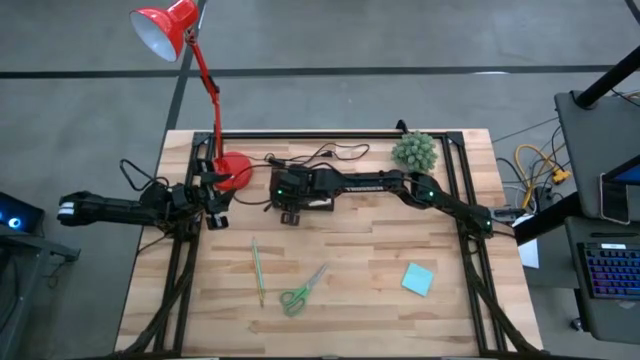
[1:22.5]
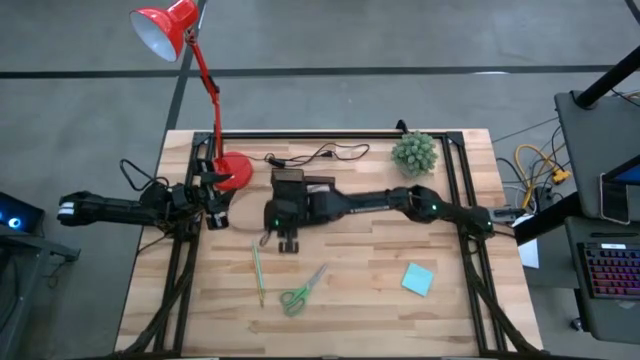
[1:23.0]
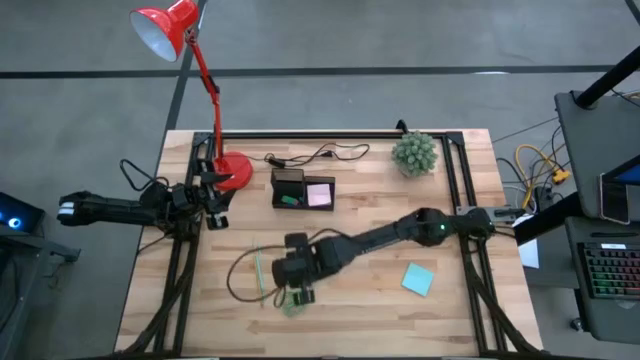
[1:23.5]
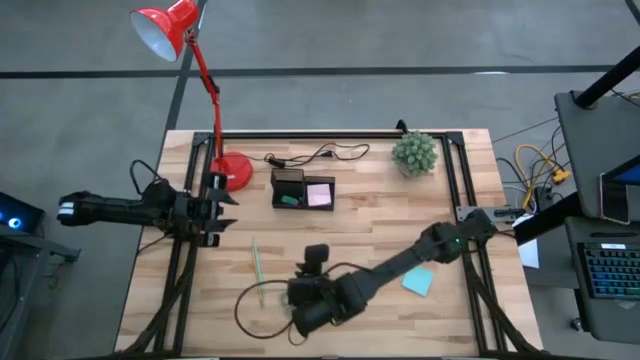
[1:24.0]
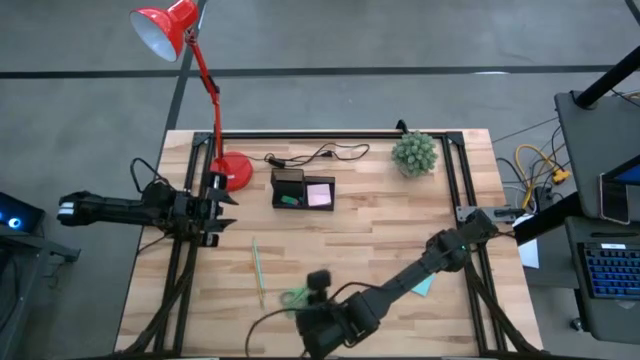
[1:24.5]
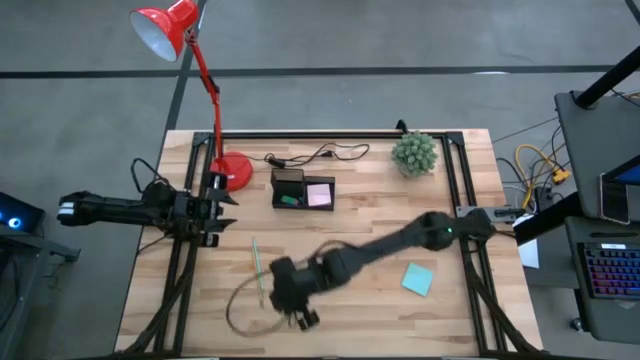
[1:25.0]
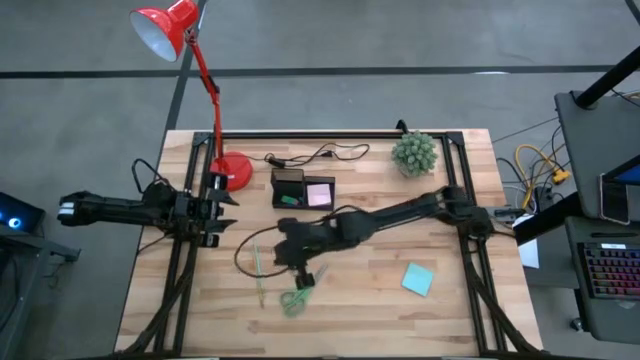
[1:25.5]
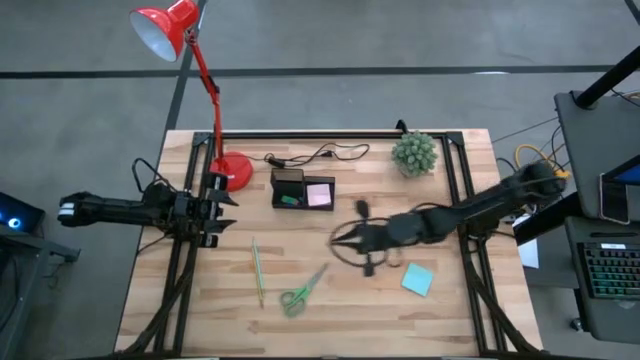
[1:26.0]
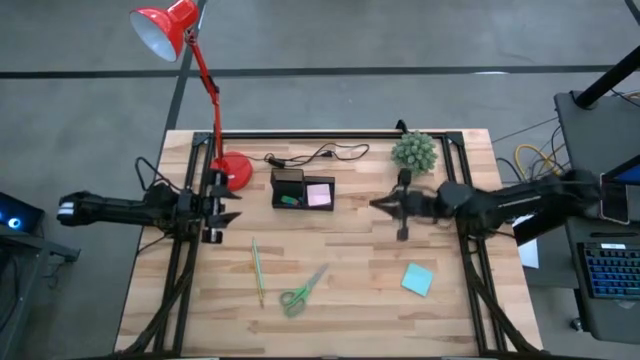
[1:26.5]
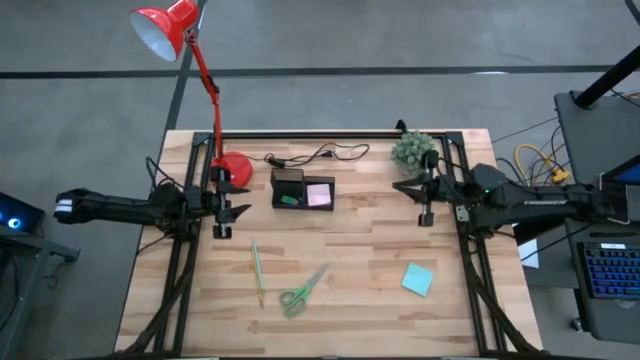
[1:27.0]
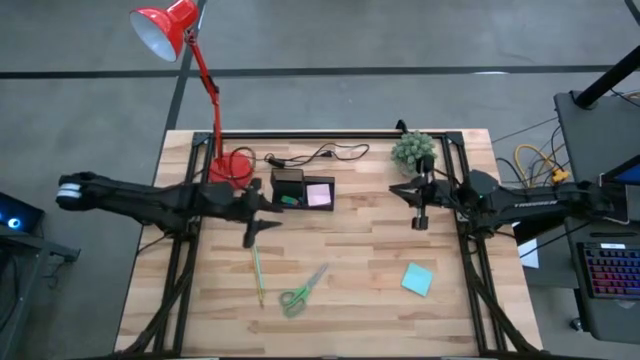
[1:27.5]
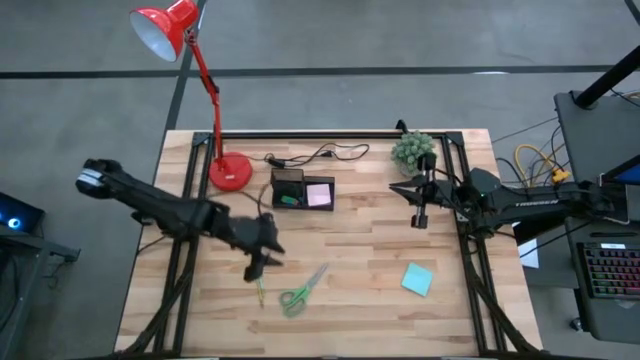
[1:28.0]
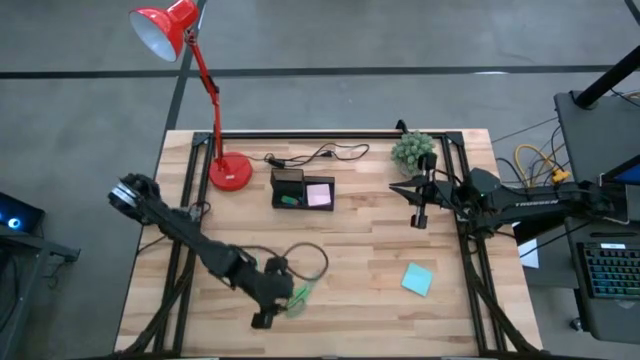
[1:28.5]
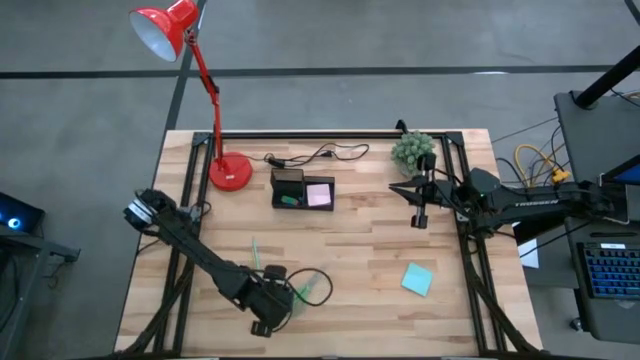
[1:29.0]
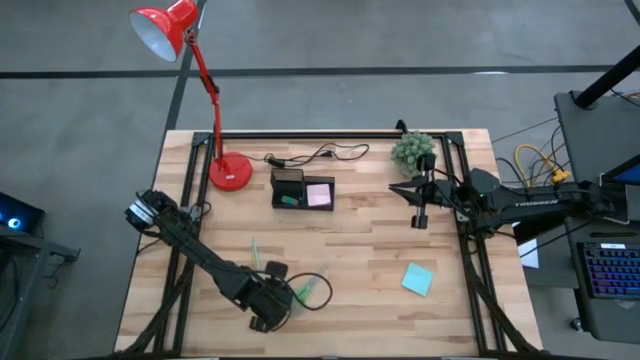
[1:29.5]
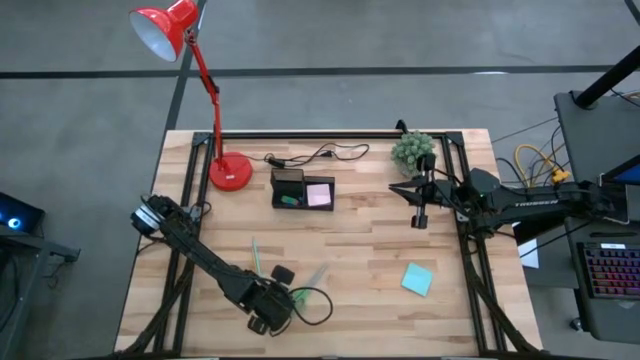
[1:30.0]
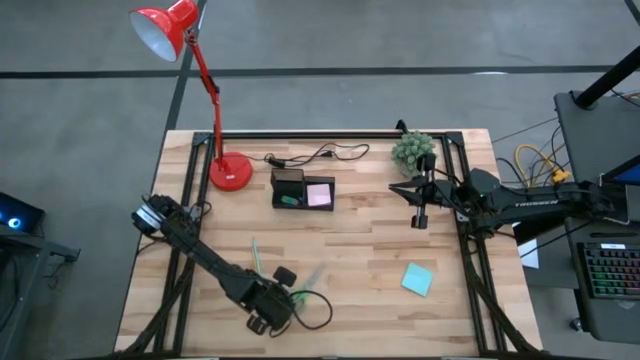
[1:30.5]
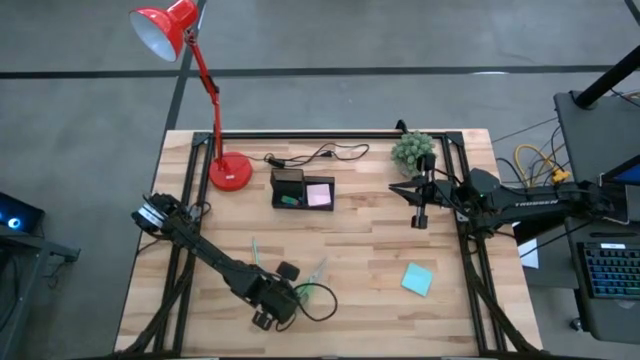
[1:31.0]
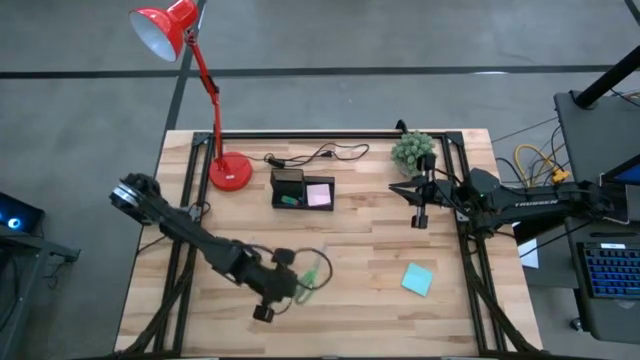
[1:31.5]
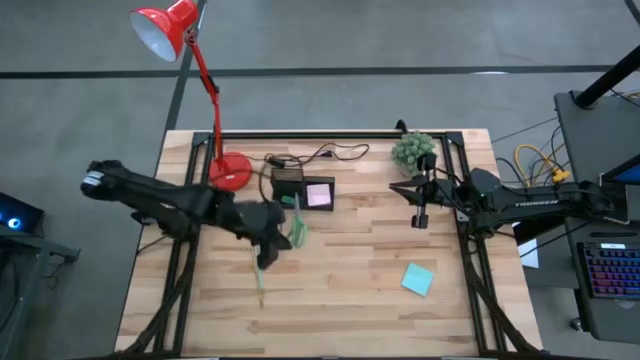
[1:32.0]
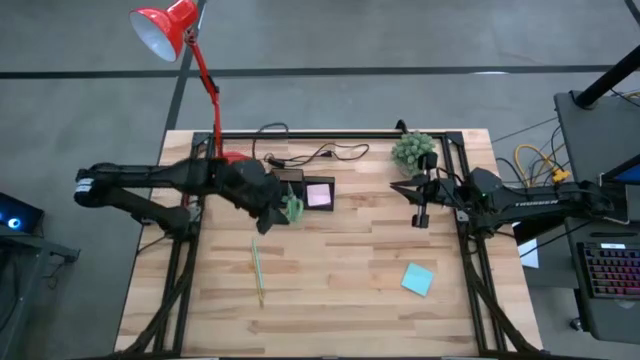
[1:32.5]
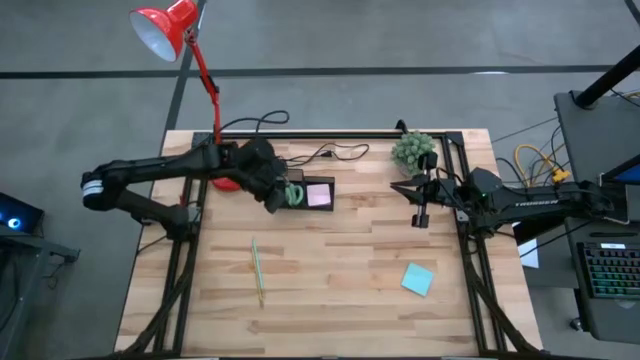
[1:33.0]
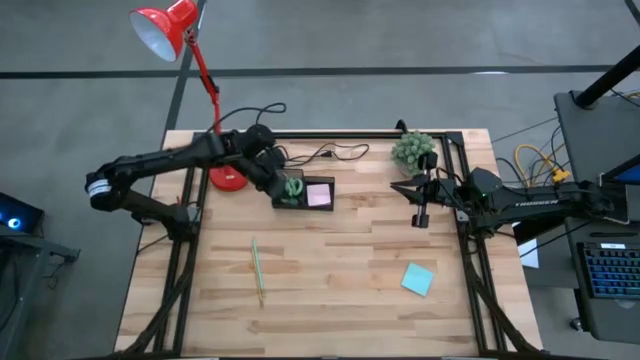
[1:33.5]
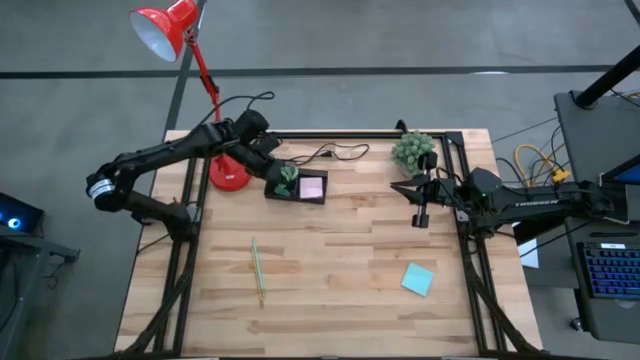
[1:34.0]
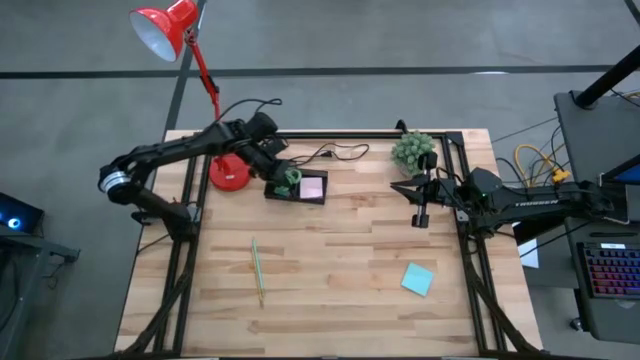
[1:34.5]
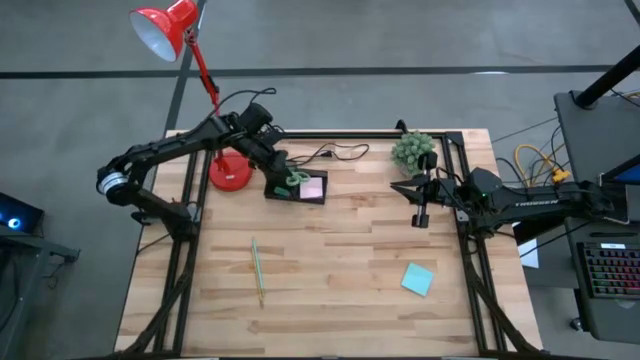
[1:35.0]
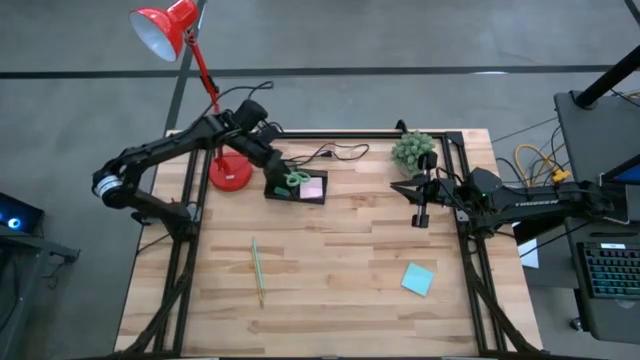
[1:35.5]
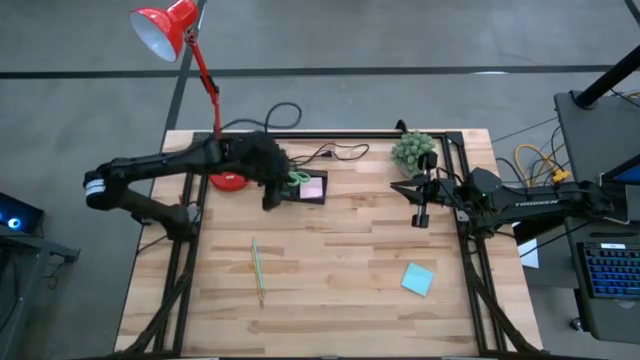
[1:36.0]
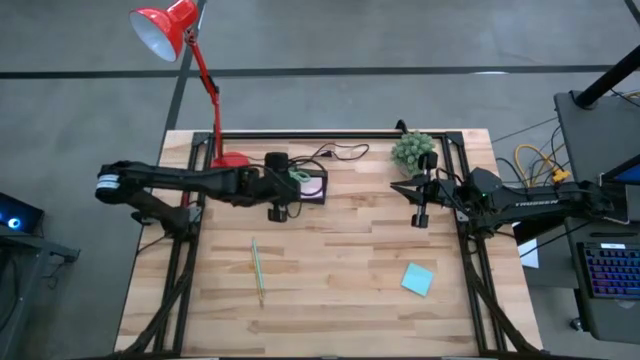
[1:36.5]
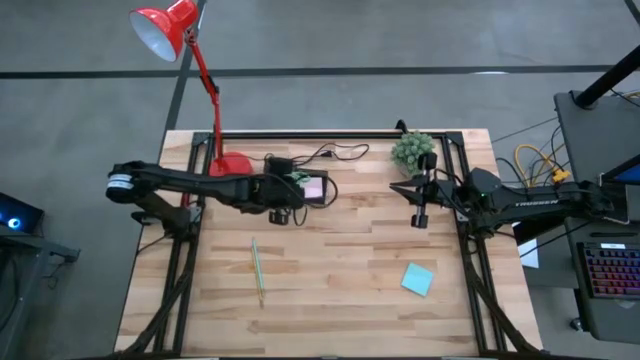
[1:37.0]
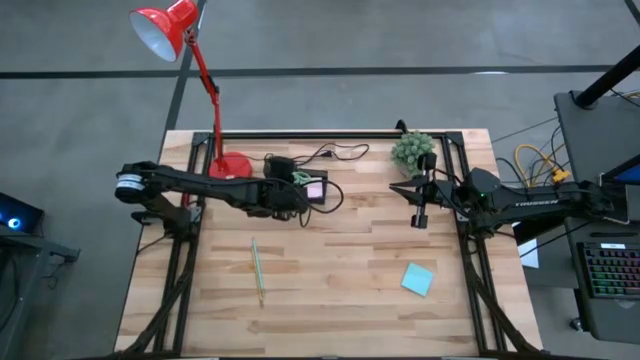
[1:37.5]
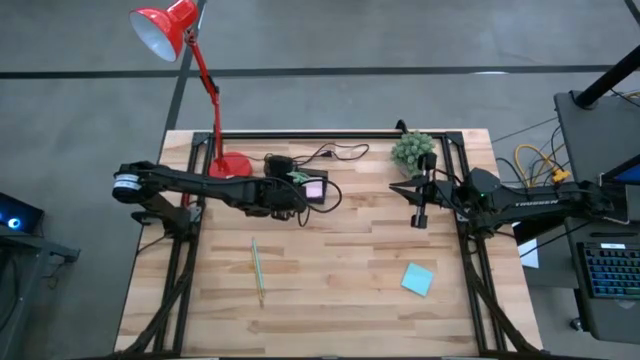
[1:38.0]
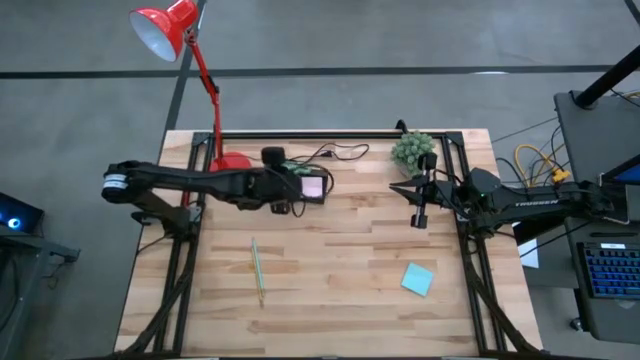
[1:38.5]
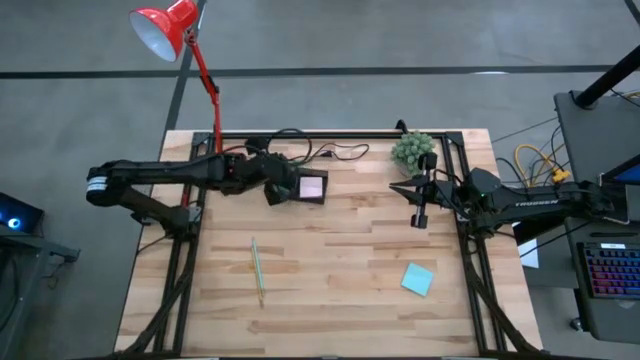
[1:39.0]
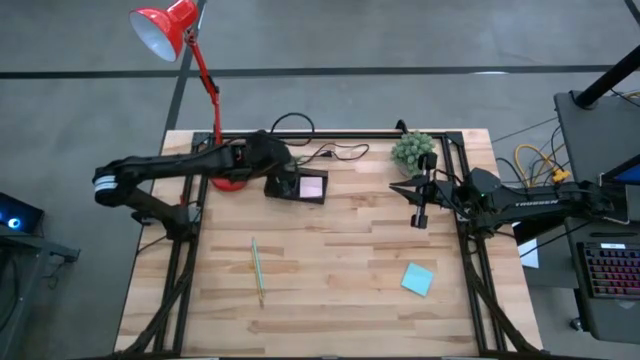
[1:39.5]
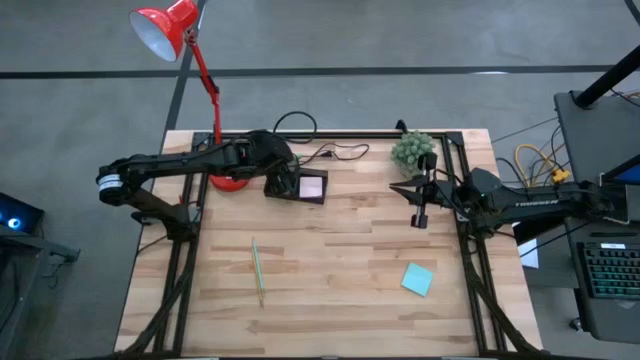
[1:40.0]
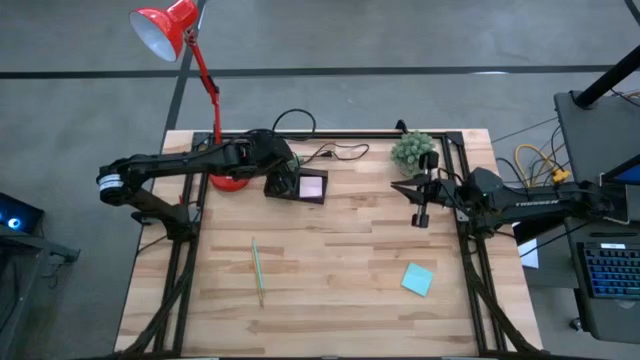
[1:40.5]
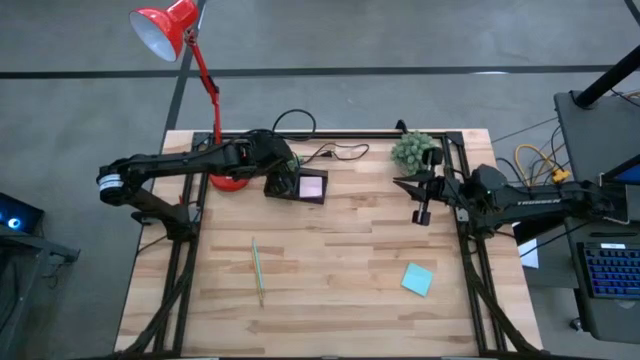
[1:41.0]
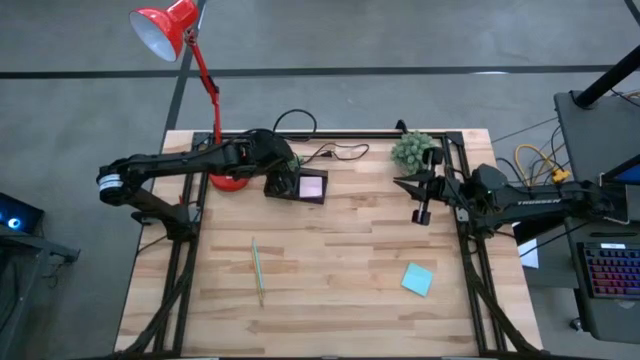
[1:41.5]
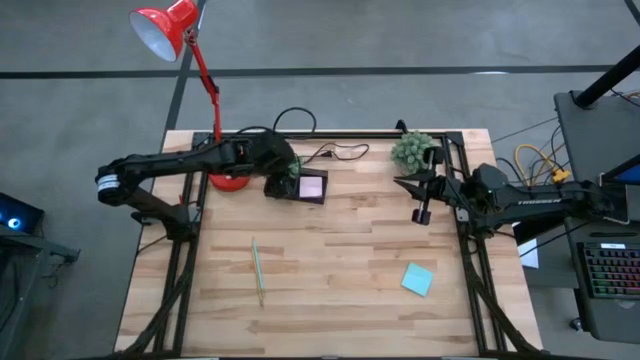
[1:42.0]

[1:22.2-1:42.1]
Task: Pick and place office supplies into organizer
Put the green scissors into the black mesh desk organizer

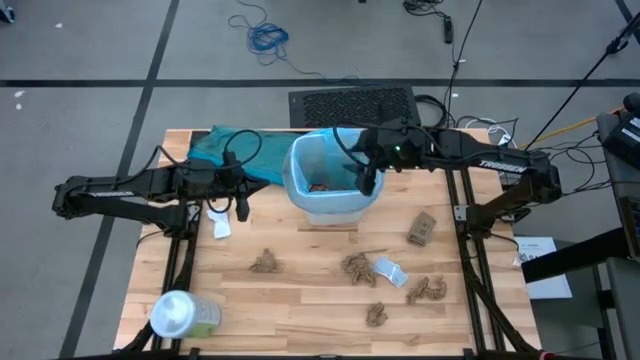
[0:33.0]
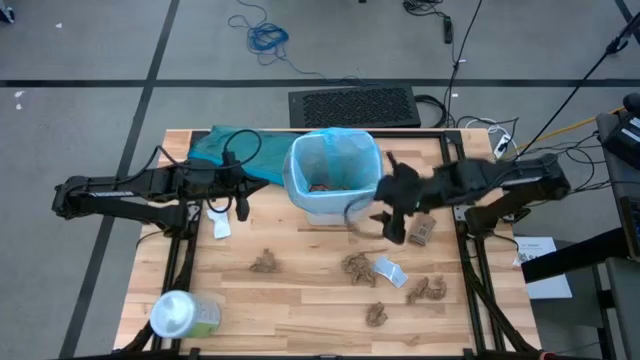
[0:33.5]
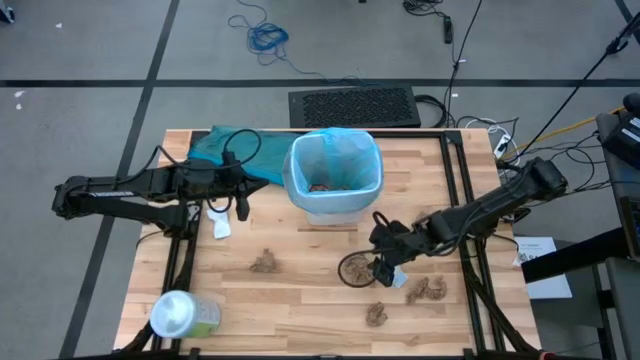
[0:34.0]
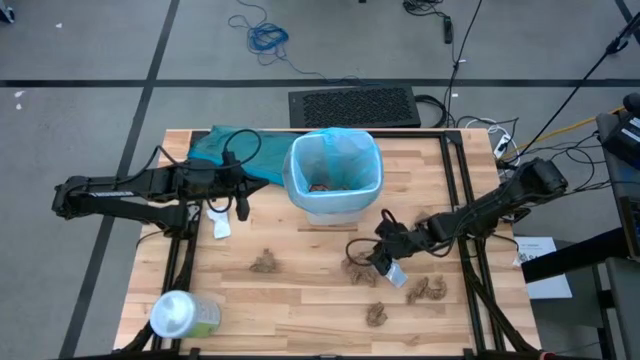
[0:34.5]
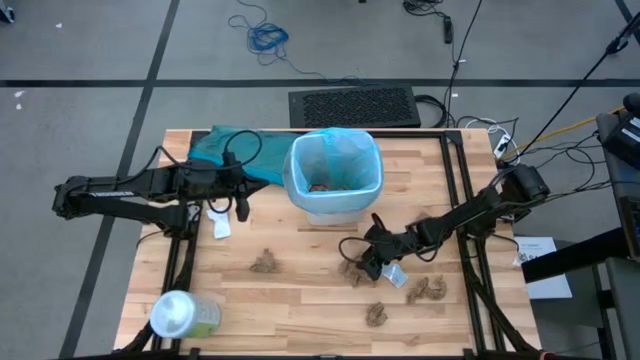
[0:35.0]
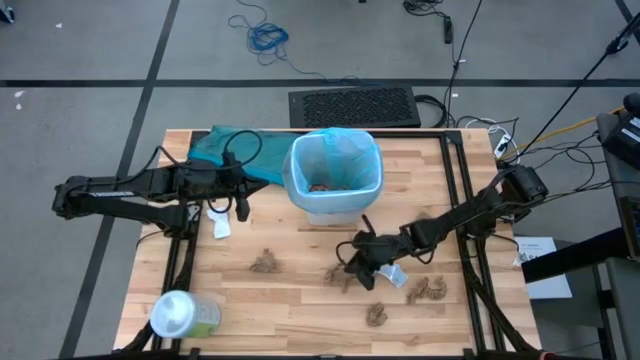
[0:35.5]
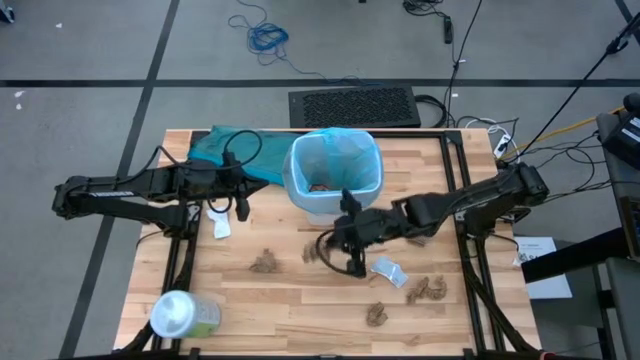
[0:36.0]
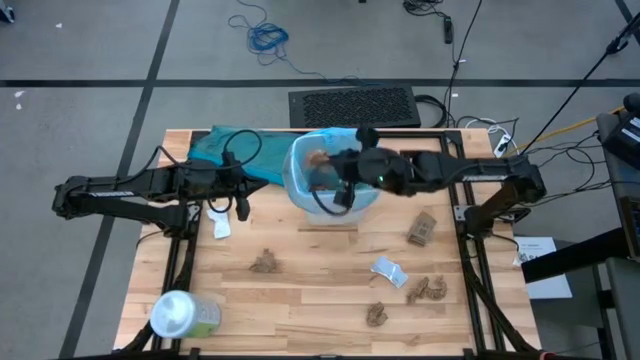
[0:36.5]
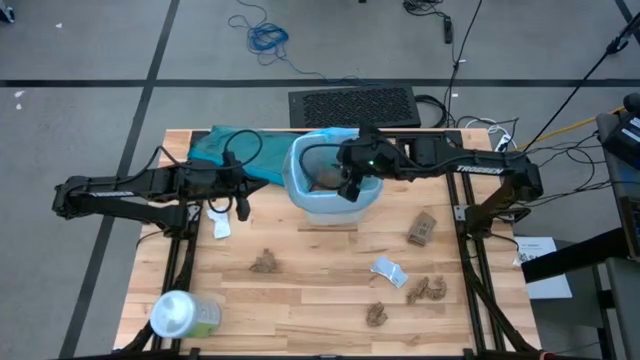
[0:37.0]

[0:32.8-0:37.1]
Task: place trash/remove bag and relplace
Put the brown napkin into the trash bin
